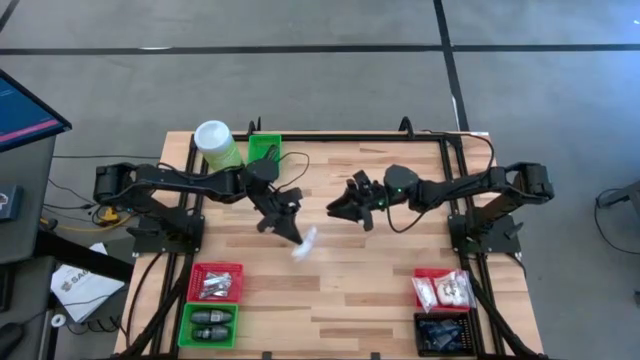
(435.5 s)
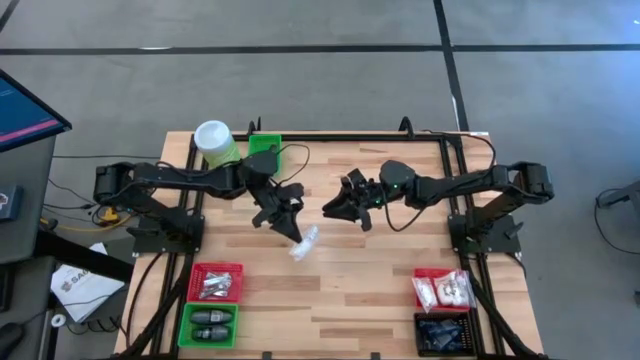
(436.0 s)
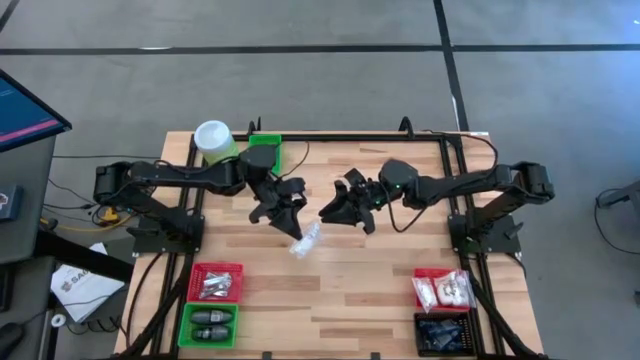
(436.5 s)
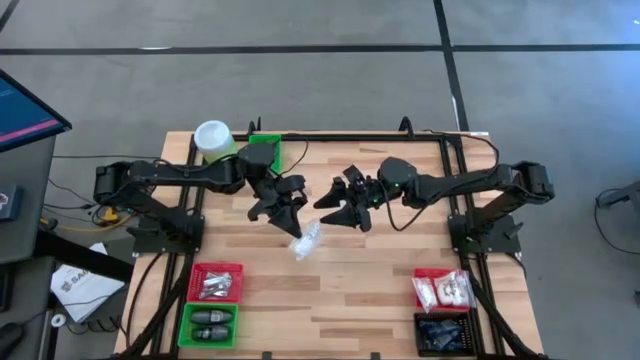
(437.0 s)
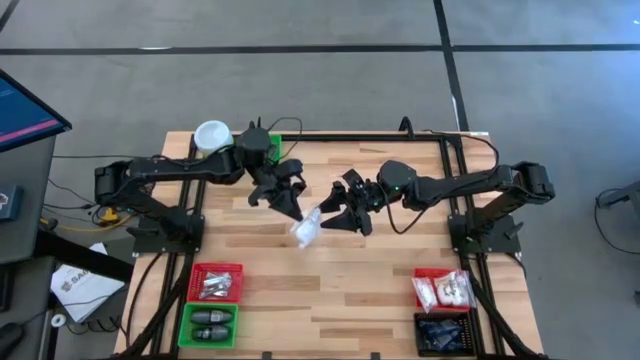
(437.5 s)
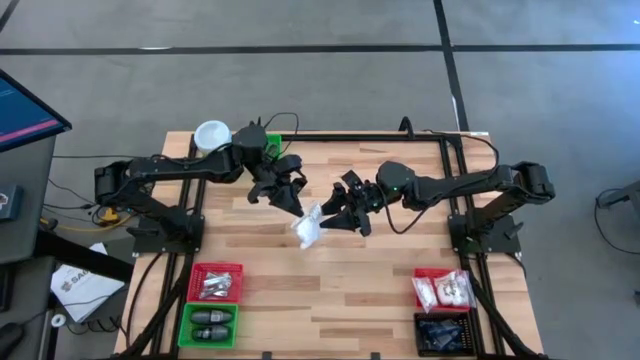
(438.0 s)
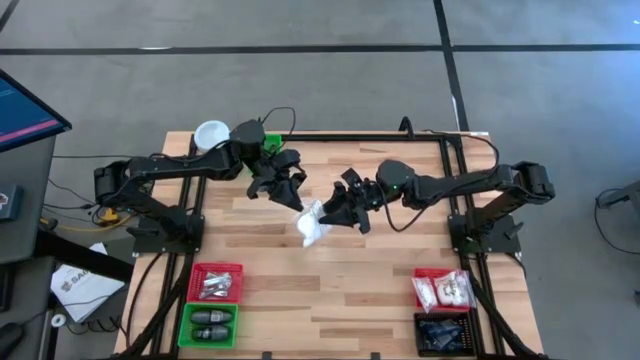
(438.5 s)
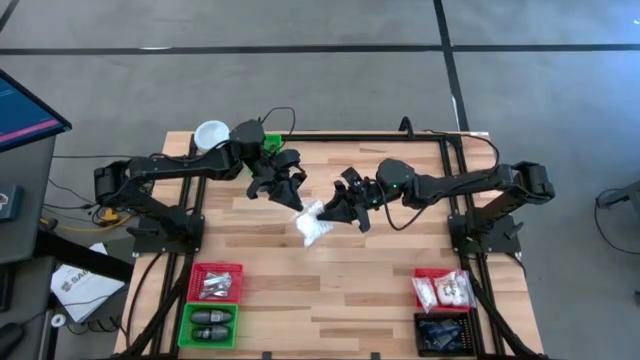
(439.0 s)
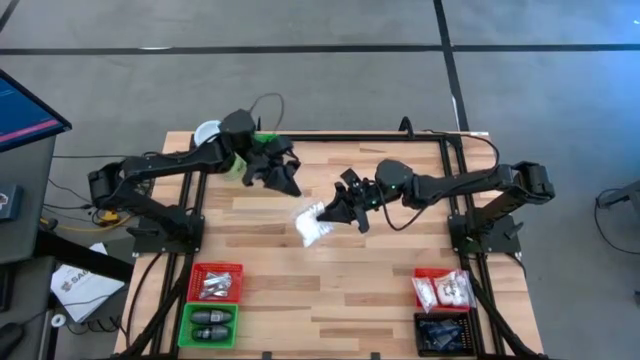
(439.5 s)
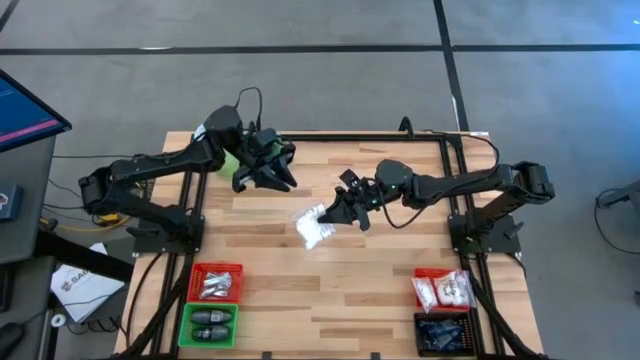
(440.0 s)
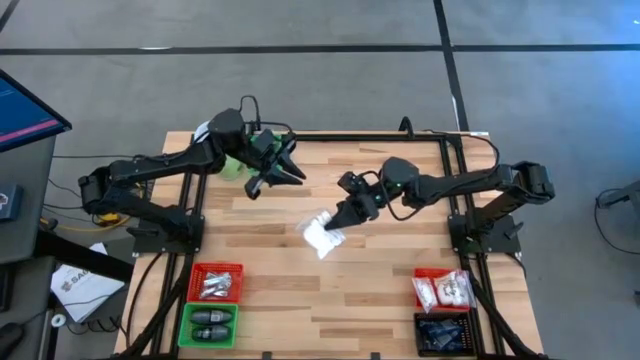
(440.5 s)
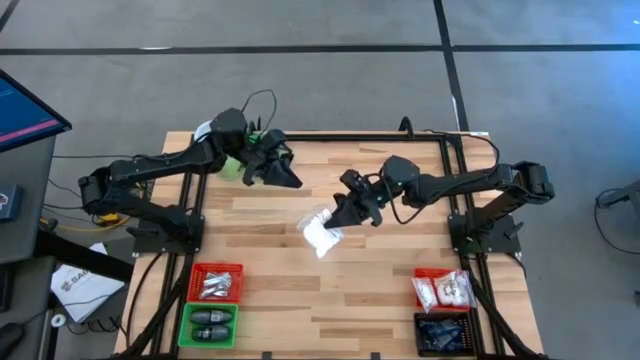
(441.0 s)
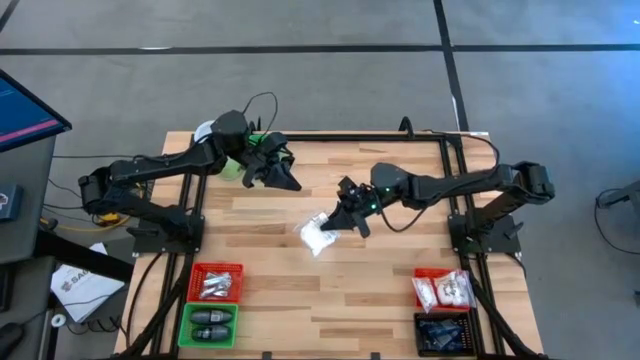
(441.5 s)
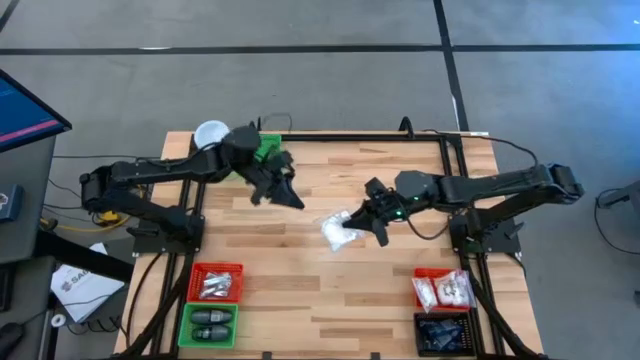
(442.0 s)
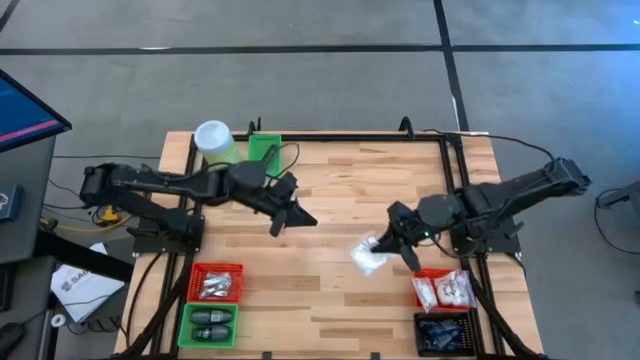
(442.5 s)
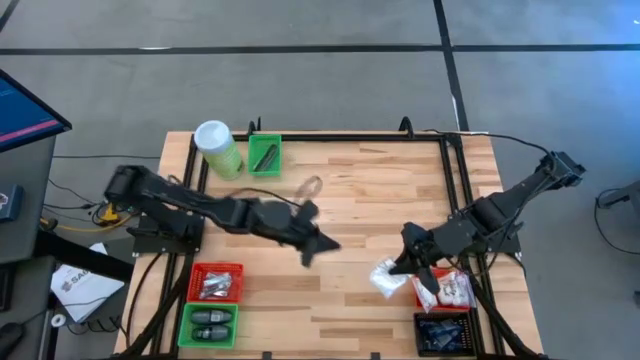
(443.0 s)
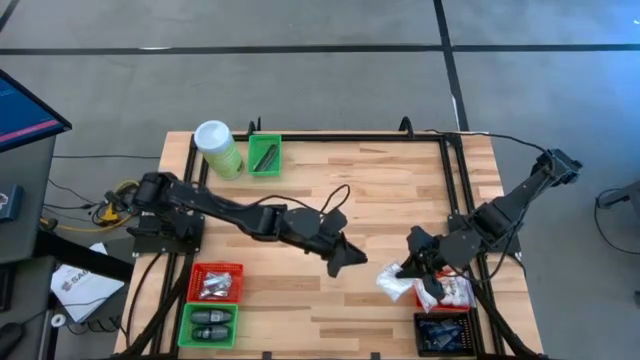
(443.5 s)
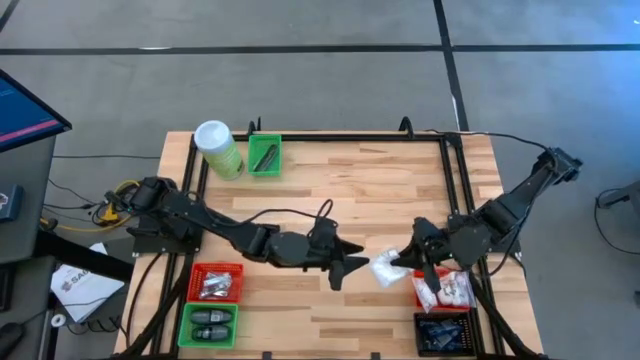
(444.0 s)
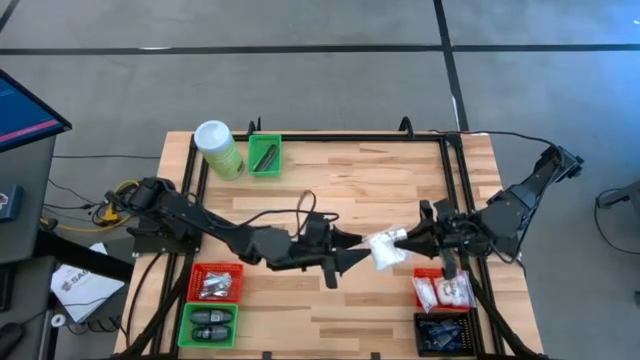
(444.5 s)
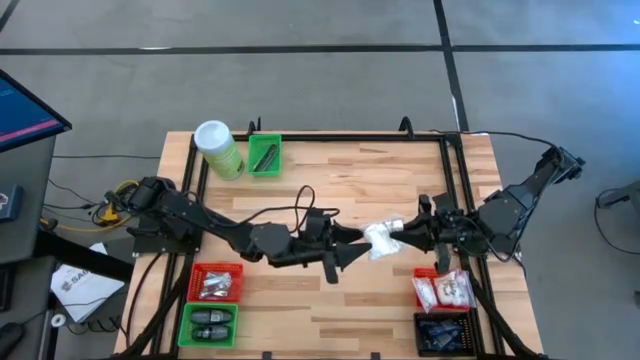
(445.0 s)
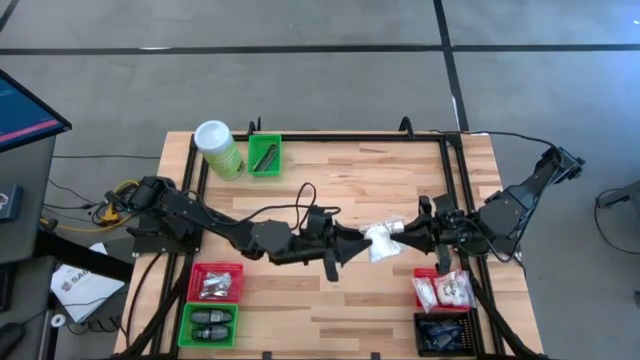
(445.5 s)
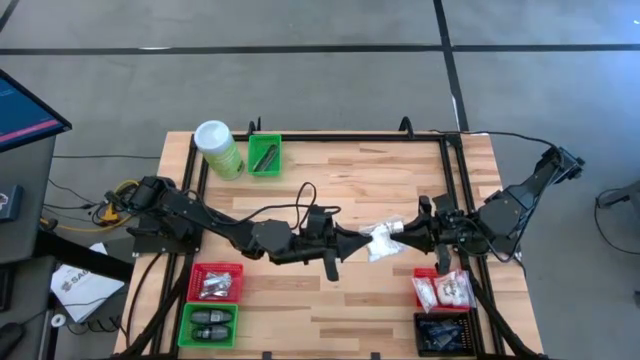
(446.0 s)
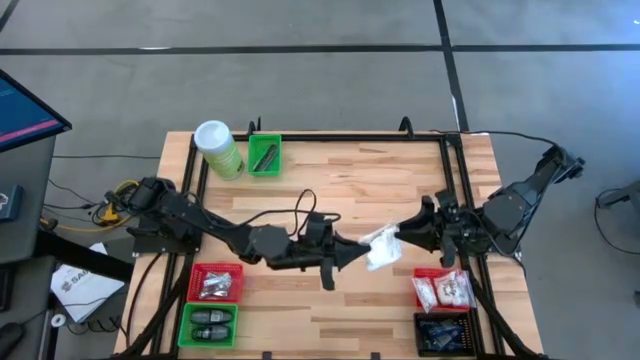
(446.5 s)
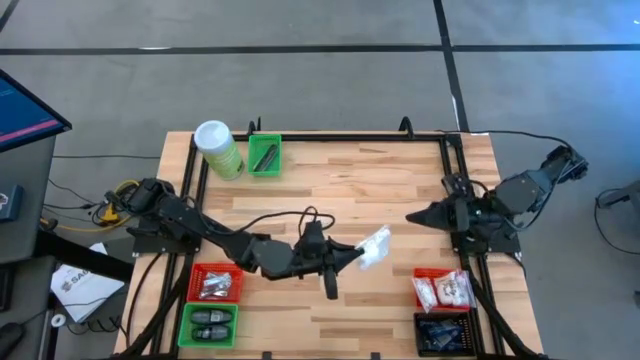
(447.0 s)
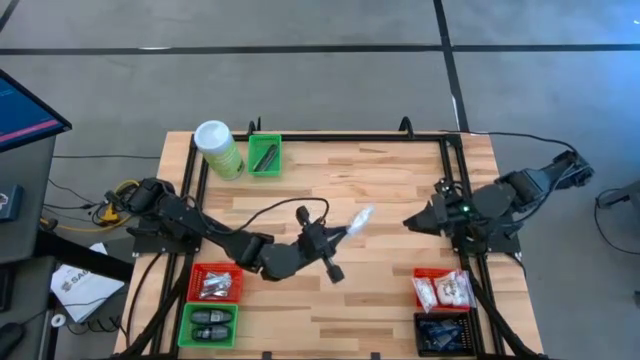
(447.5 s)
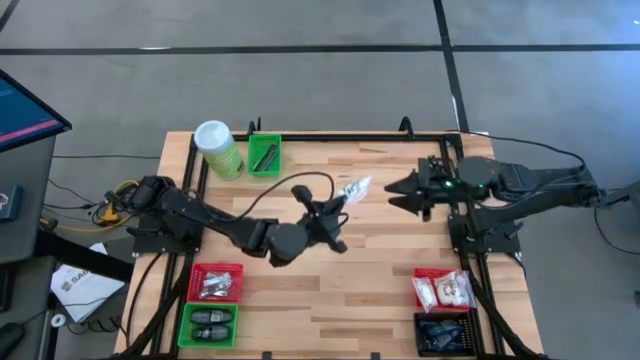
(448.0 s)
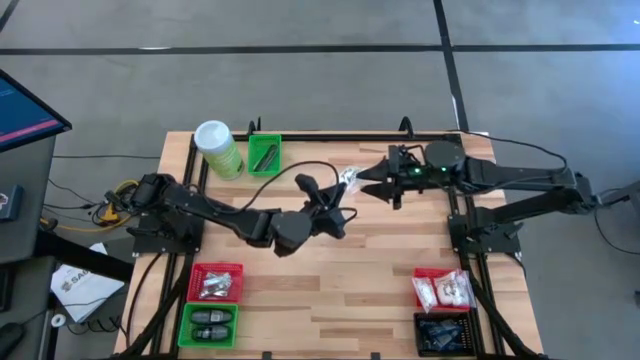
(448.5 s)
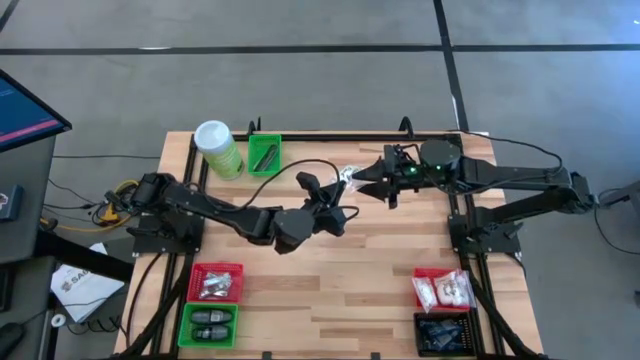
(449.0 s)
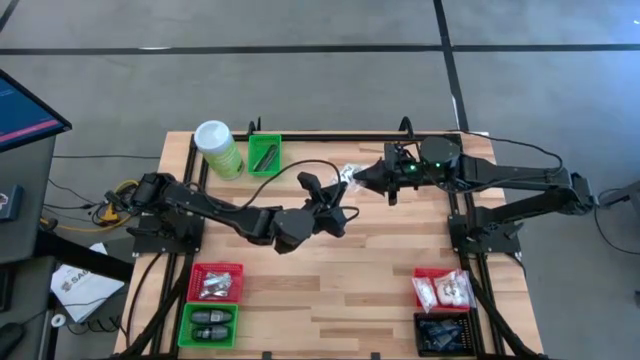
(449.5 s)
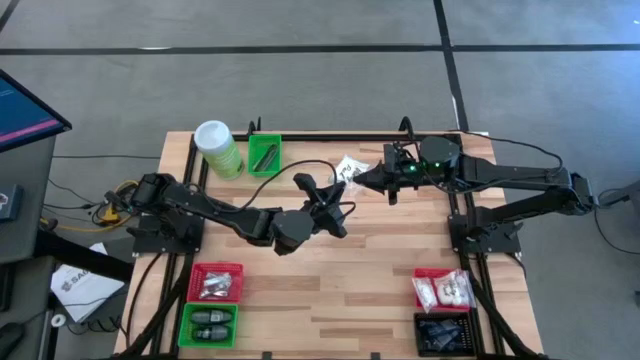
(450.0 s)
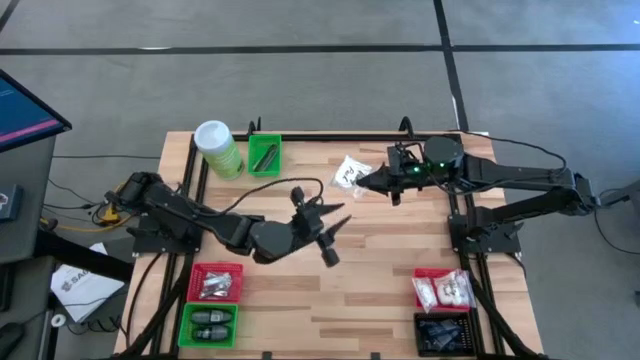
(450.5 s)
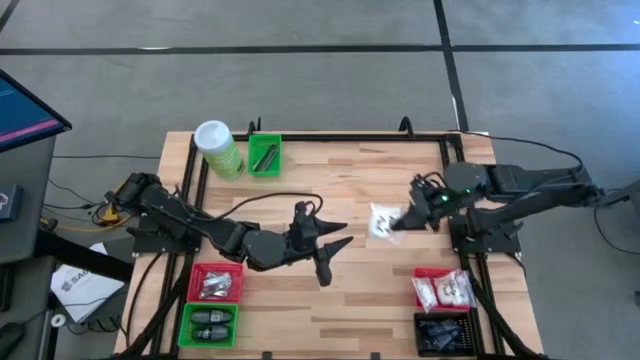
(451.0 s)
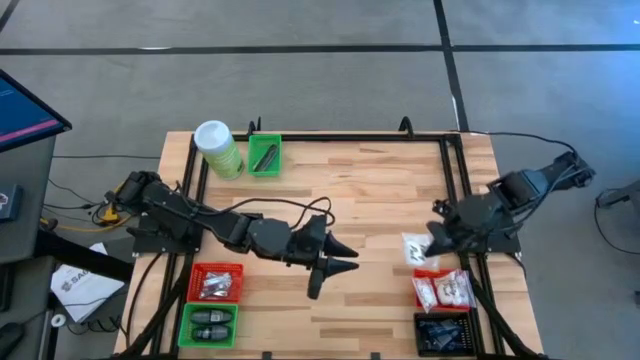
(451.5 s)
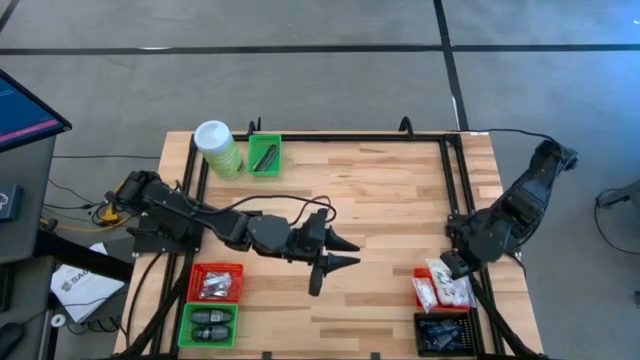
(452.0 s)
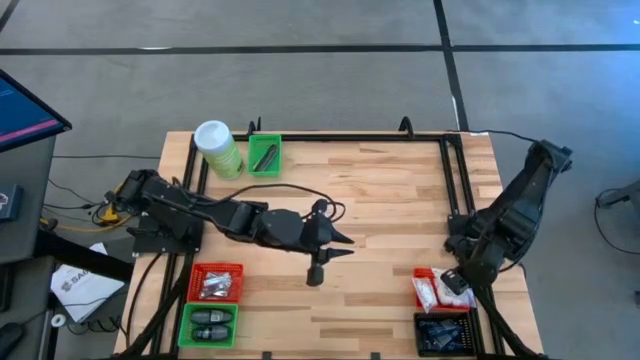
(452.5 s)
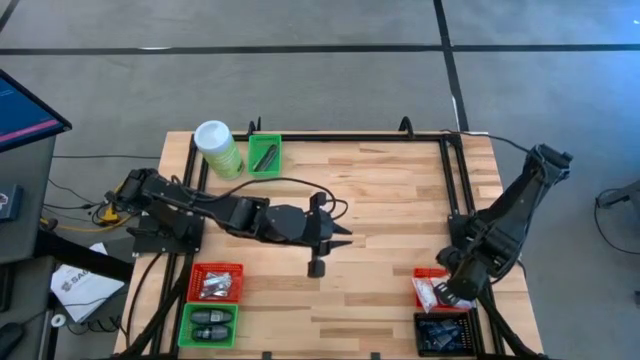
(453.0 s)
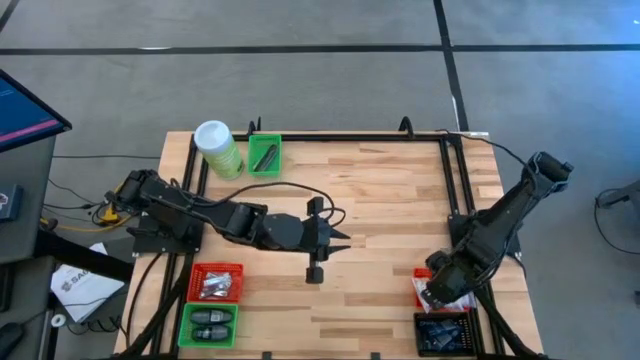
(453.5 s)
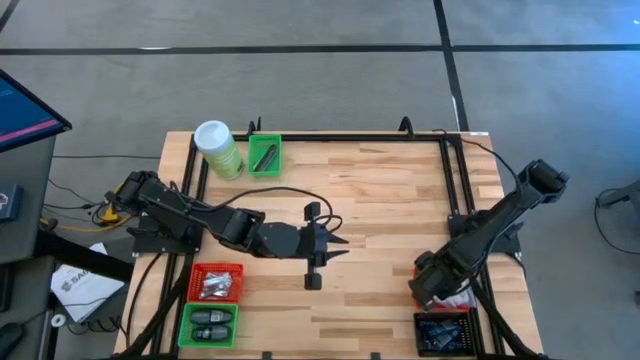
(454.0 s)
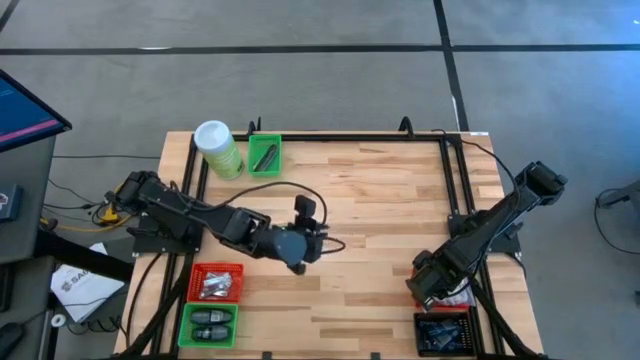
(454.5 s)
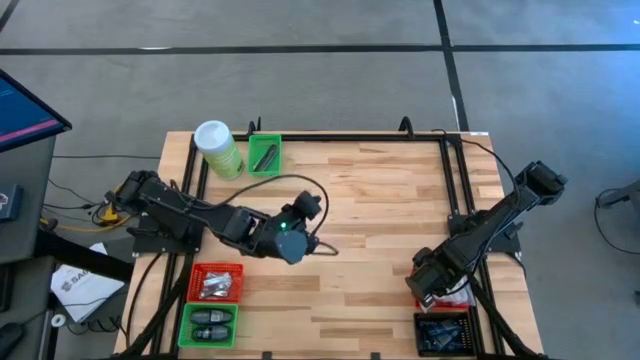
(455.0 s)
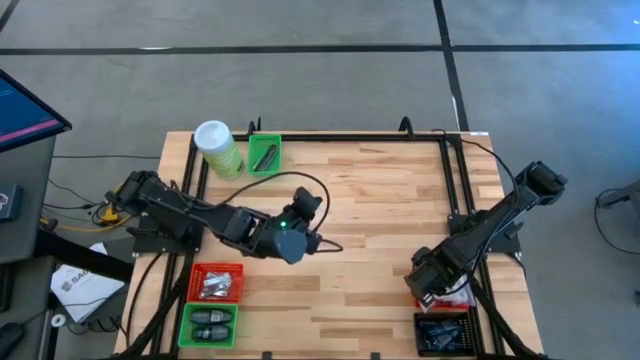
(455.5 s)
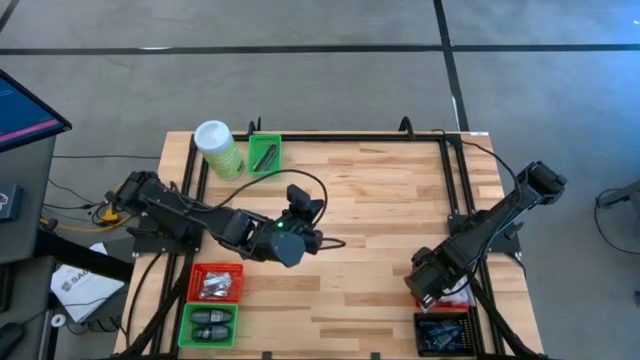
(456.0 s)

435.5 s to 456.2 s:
Task: Pick & Place Travel size toiletries
Put the cotton pack into the right red bin
